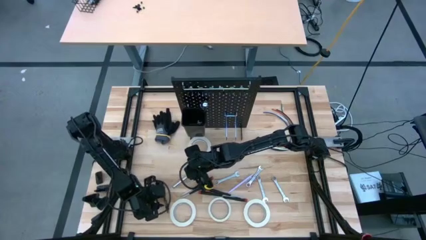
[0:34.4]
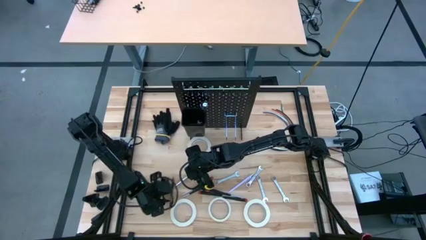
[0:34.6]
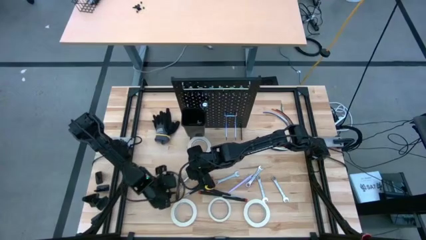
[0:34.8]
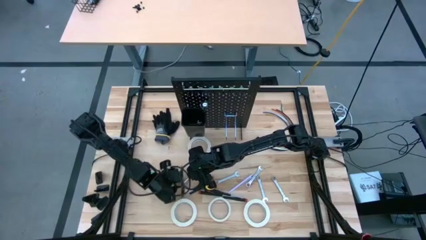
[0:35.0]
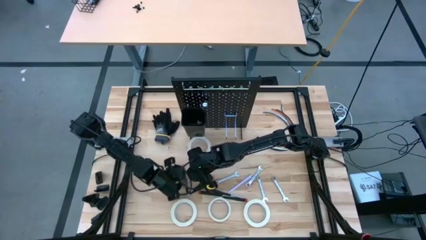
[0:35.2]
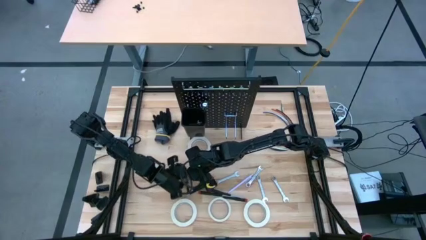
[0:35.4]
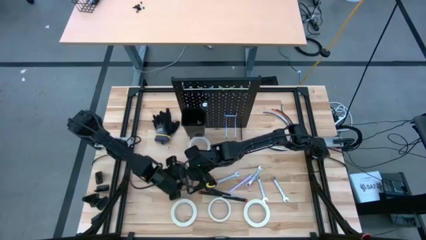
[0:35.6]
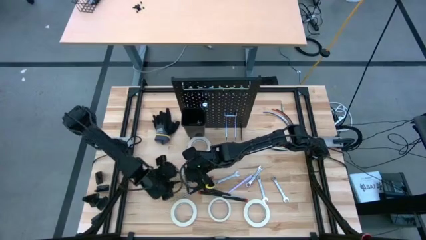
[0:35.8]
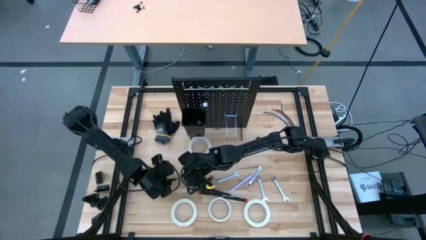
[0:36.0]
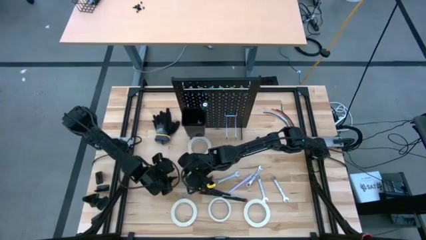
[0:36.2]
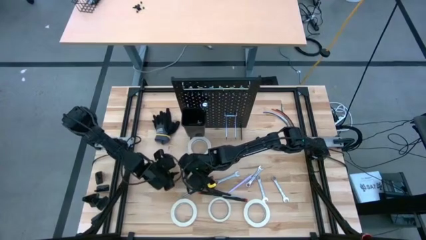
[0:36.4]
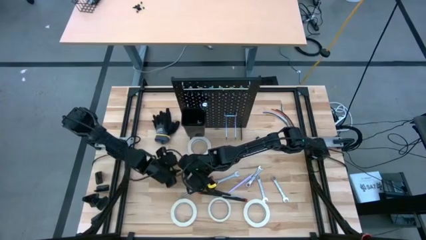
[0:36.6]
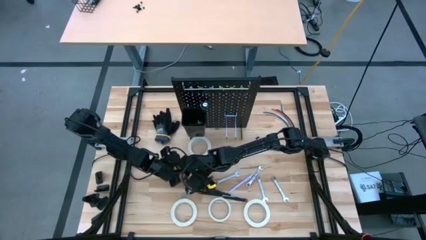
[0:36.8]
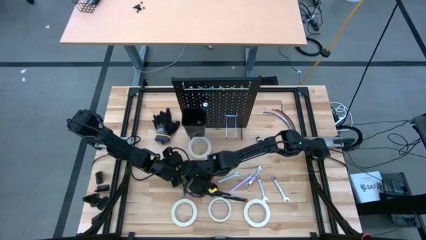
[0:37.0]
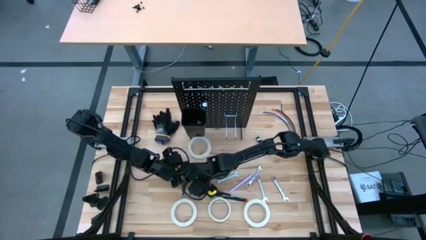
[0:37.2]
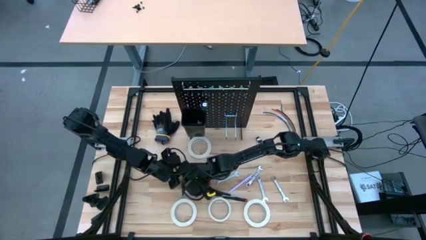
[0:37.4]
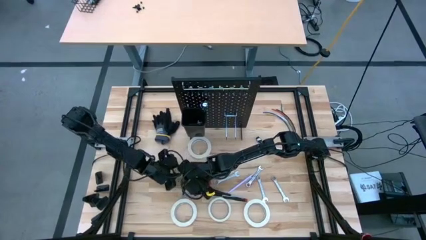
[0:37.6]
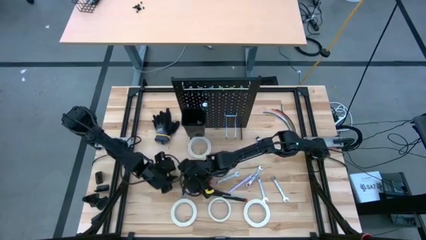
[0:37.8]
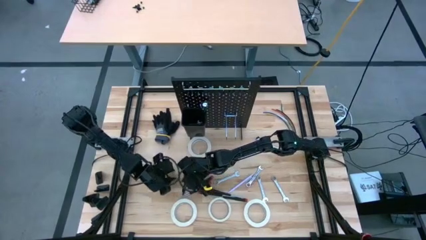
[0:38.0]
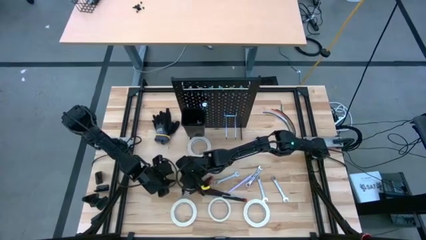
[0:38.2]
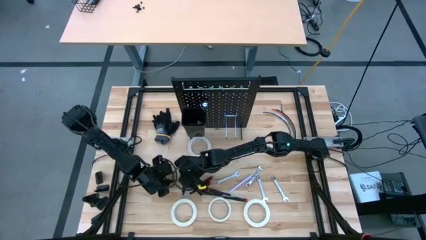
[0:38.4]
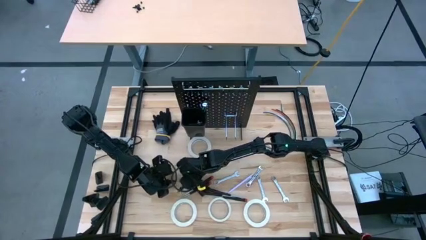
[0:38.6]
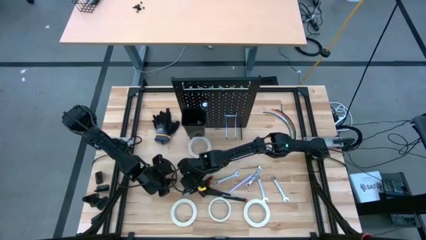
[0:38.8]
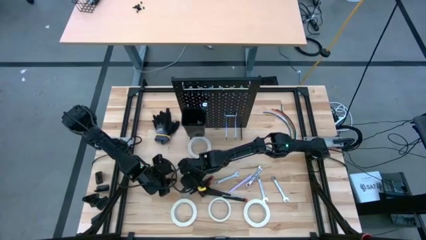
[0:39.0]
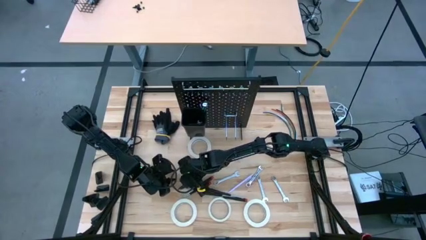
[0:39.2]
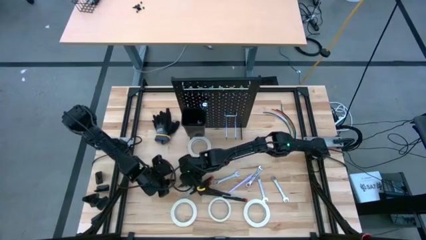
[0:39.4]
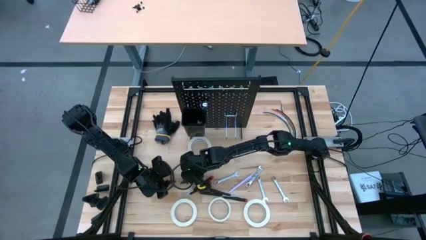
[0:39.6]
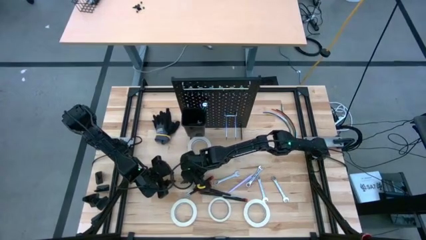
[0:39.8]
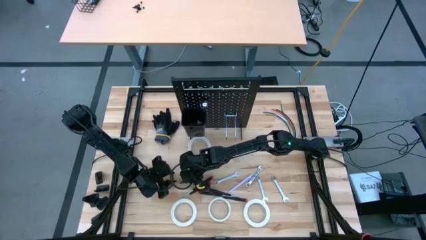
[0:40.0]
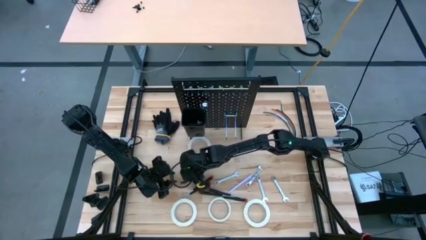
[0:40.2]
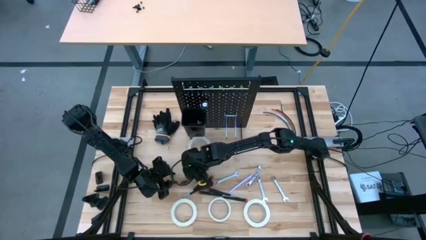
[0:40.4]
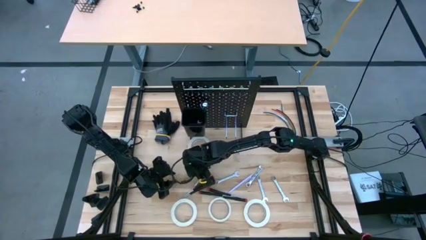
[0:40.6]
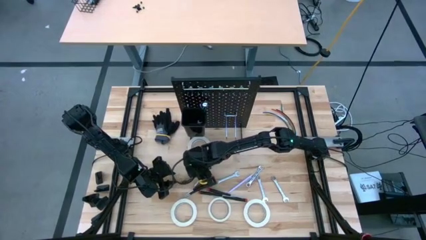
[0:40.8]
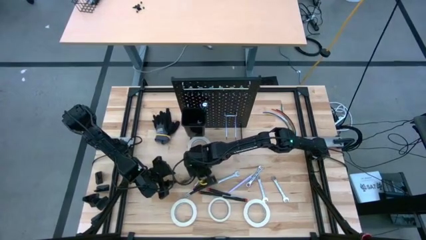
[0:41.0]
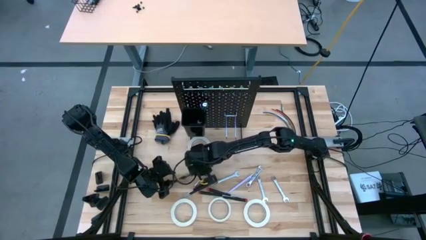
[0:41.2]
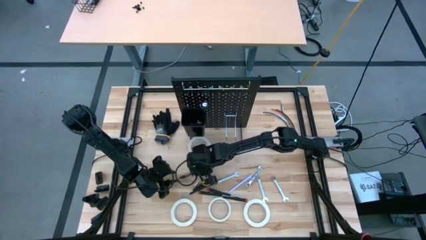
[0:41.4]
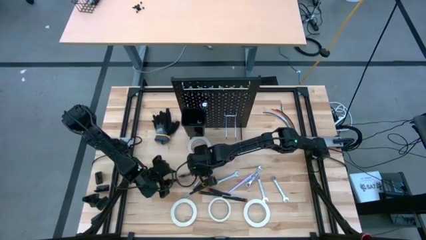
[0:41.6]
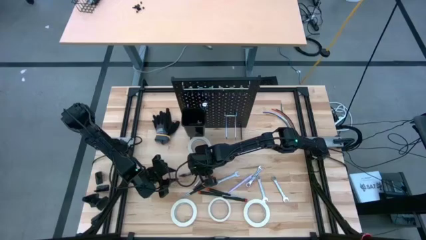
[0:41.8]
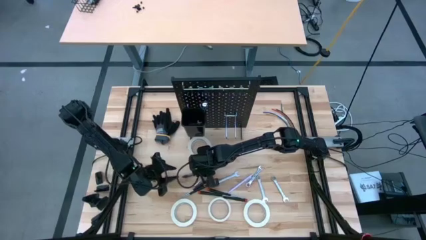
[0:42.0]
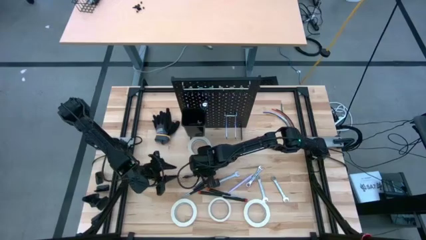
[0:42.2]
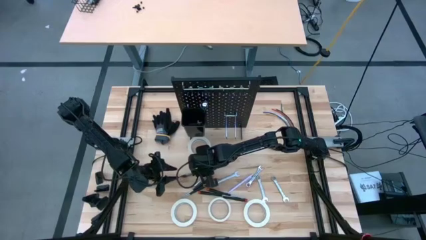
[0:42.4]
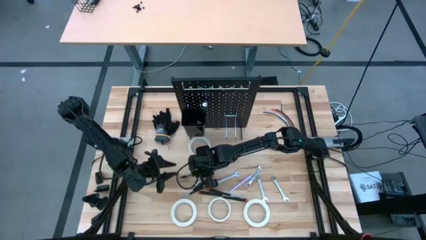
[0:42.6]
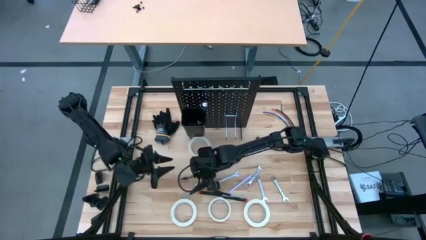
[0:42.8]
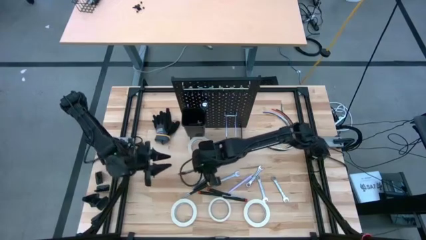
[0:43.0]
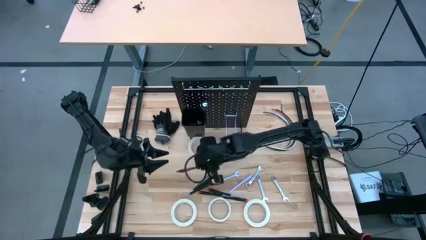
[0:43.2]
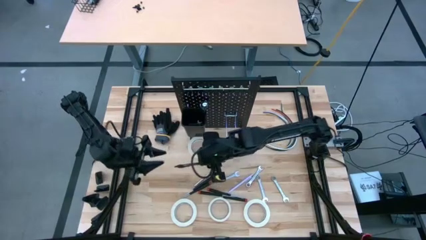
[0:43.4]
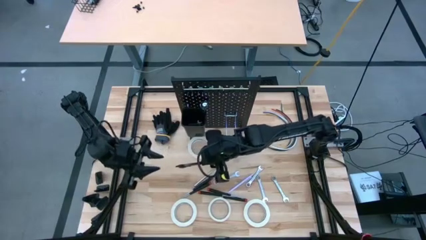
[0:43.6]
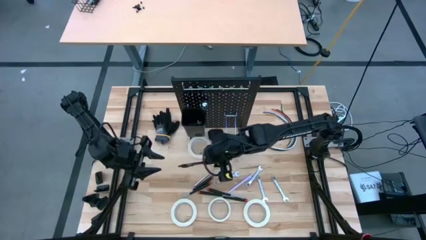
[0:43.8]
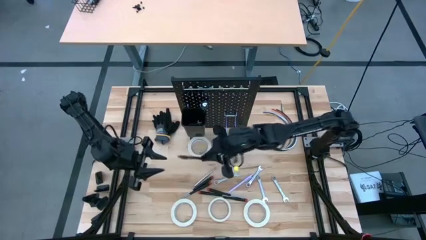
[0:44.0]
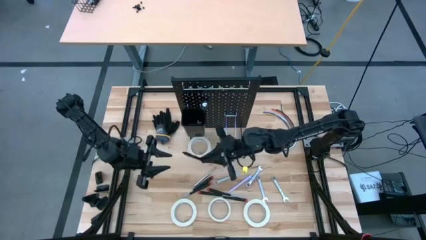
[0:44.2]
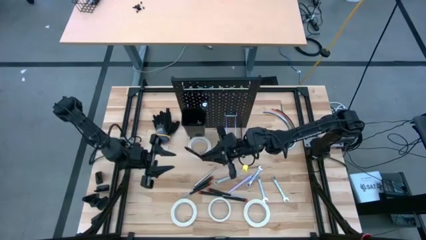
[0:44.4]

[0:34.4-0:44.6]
Task: Hang tools onto peg board
Put the black pen into the black bin on the peg board
